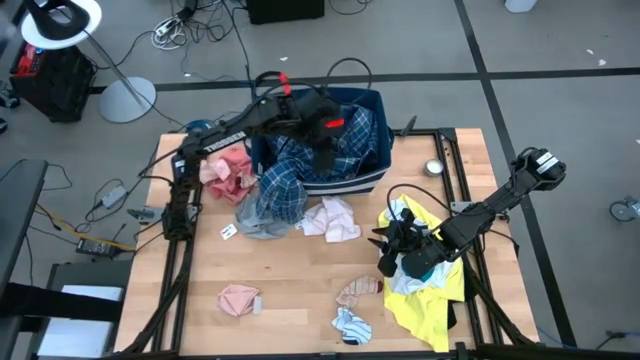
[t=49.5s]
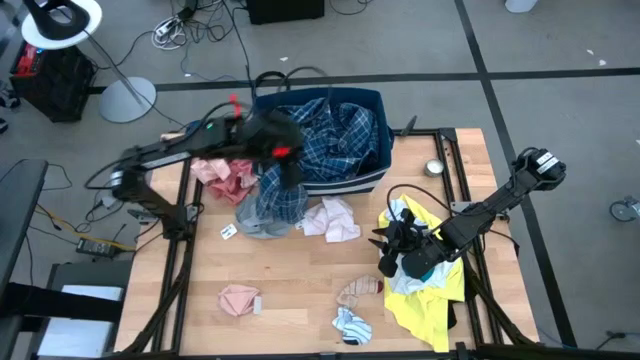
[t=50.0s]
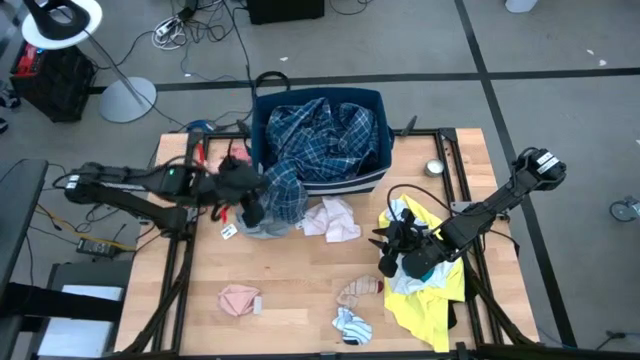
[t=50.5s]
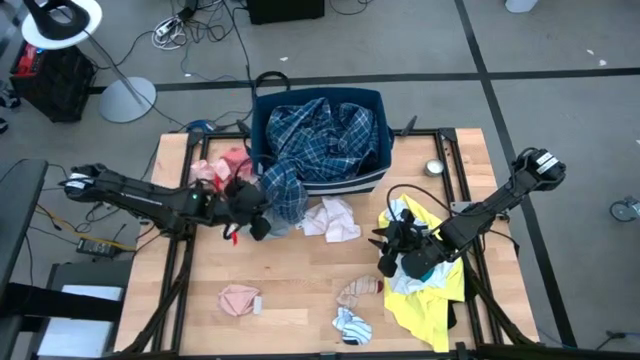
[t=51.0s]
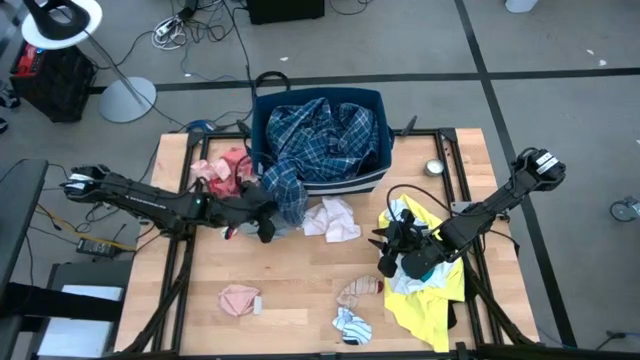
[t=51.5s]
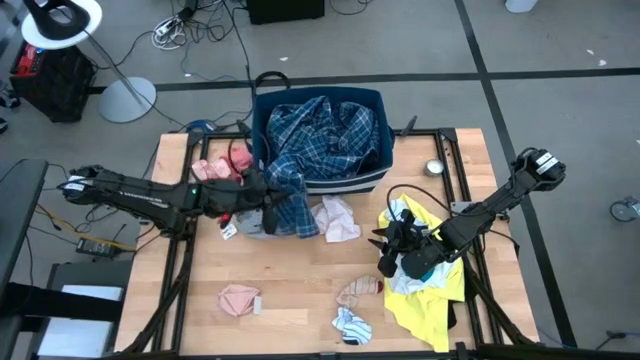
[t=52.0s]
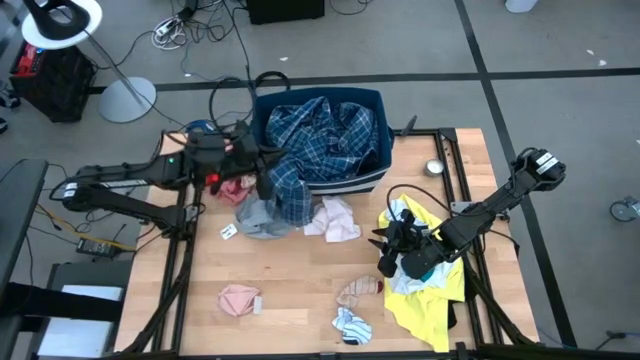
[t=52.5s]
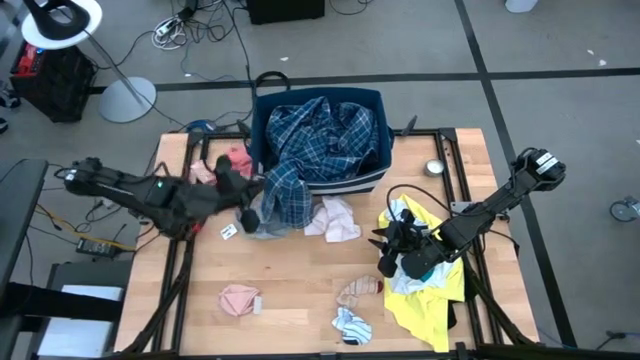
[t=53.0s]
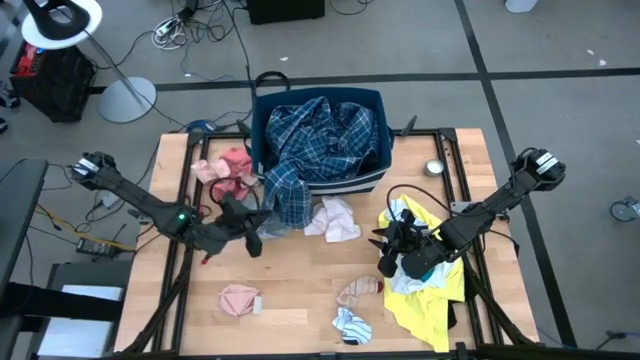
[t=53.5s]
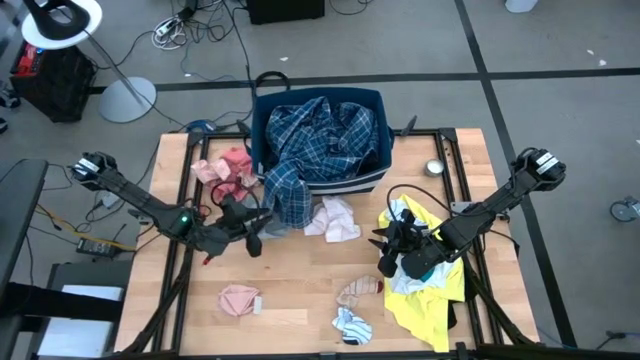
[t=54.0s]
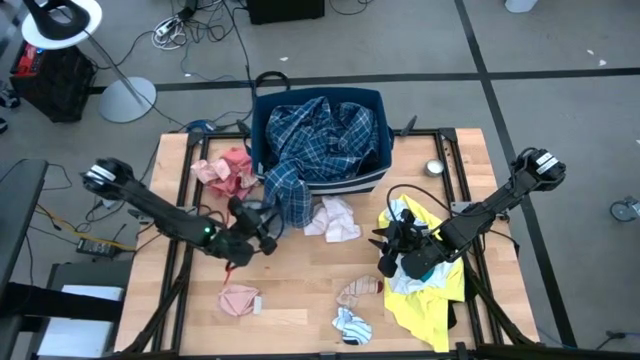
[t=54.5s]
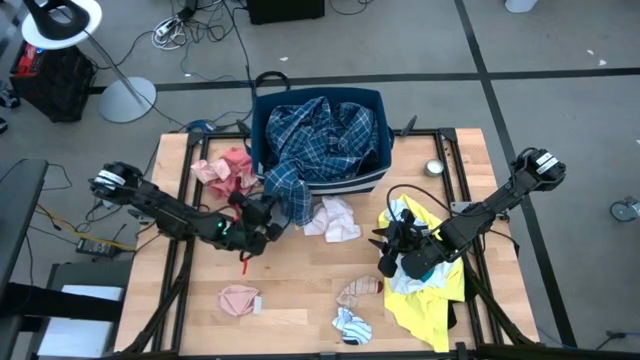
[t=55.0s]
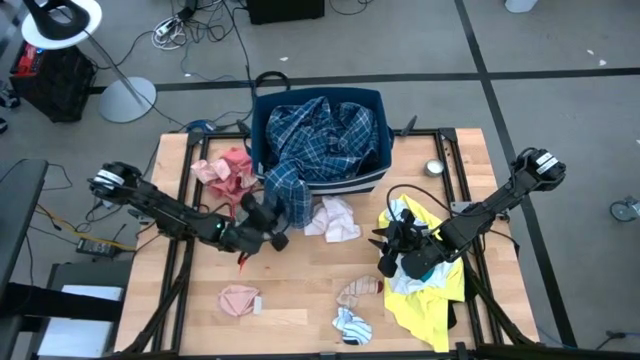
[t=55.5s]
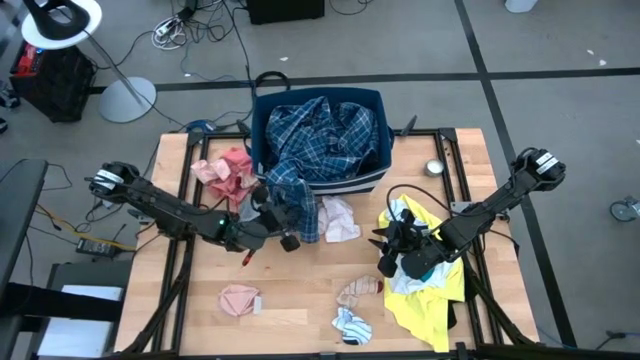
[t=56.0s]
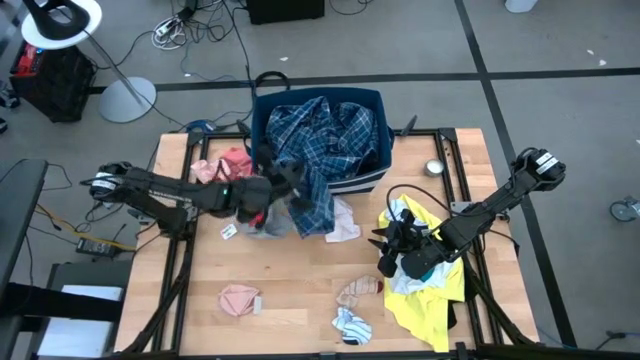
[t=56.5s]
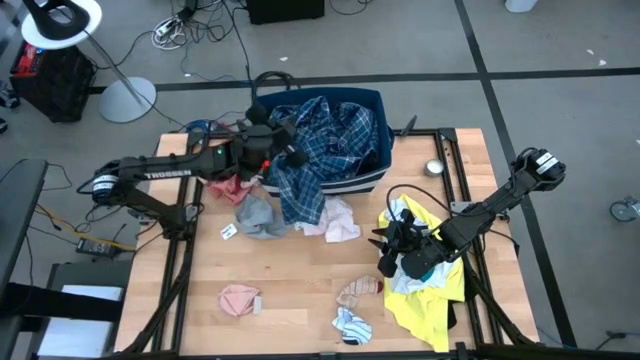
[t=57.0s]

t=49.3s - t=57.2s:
Task: Sort clothes
Put the blue checkered pants into the blue bin

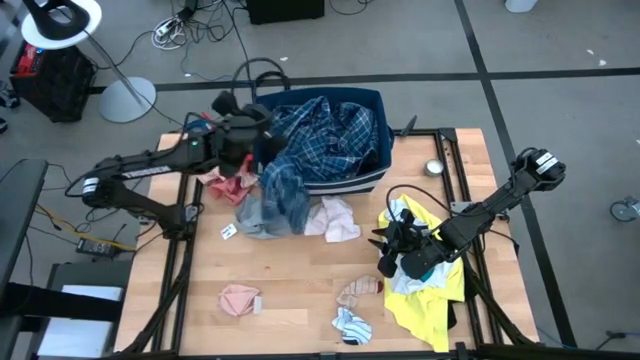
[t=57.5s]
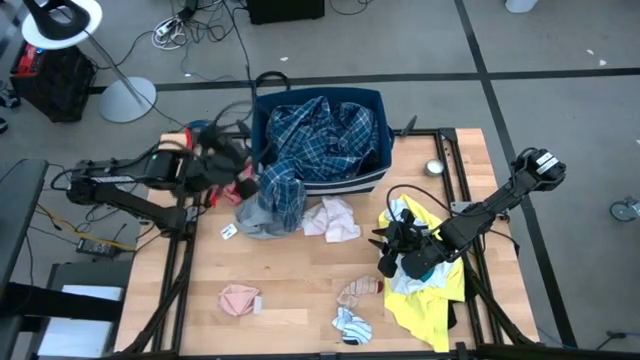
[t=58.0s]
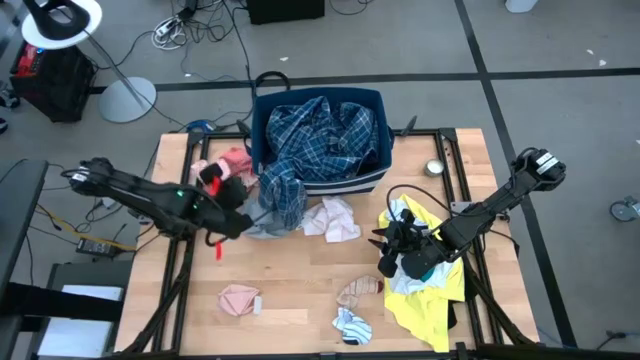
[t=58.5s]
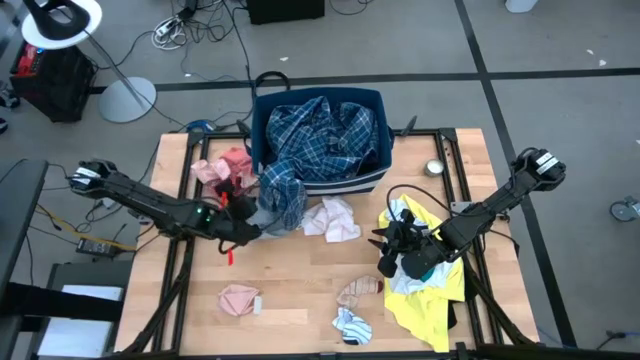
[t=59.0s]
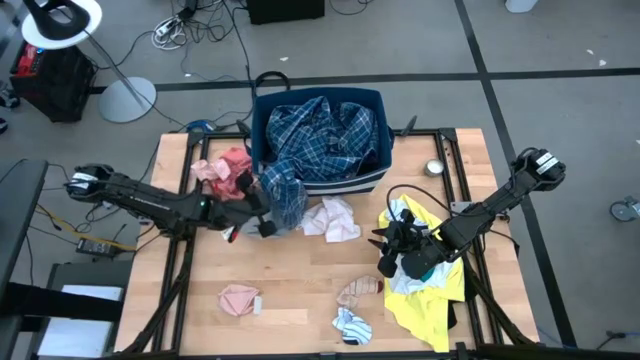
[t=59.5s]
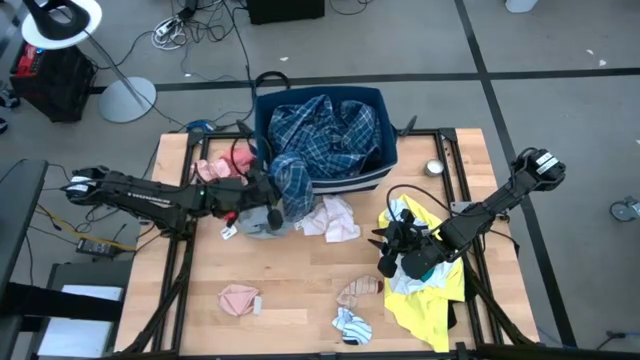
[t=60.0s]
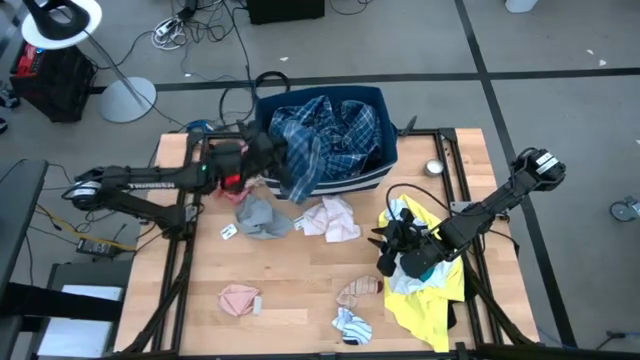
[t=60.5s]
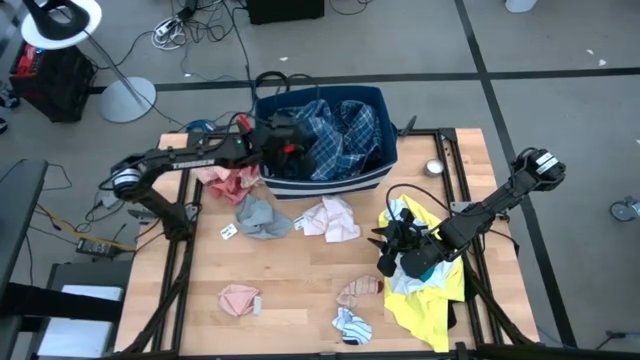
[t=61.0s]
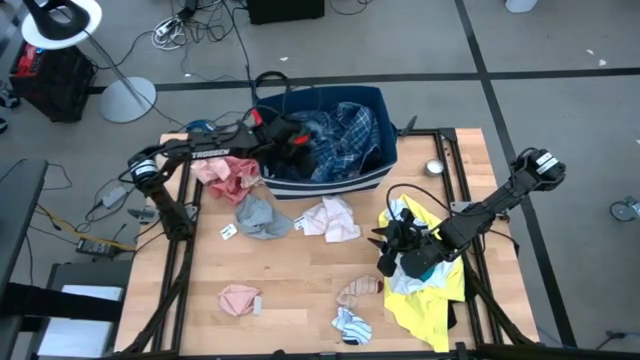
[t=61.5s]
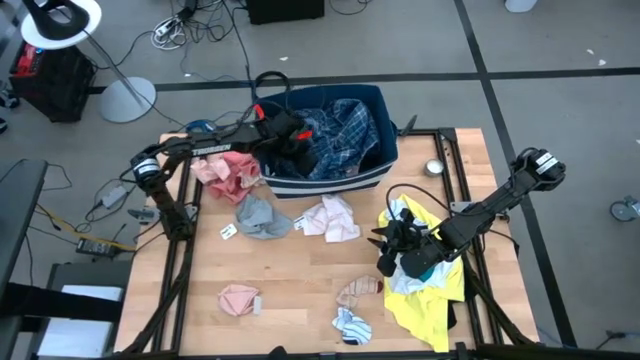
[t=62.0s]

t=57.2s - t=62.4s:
Put the blue checkered pants into the blue bin

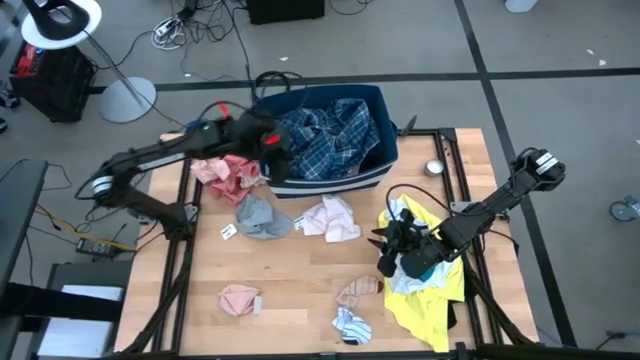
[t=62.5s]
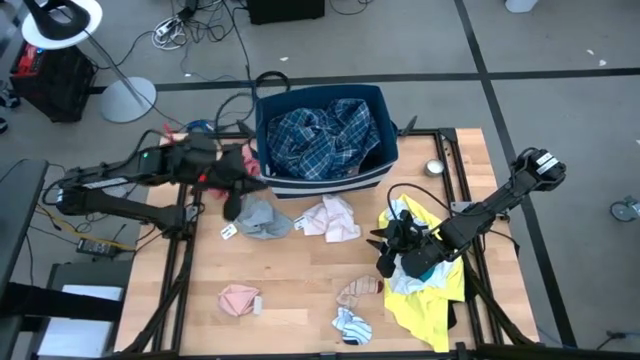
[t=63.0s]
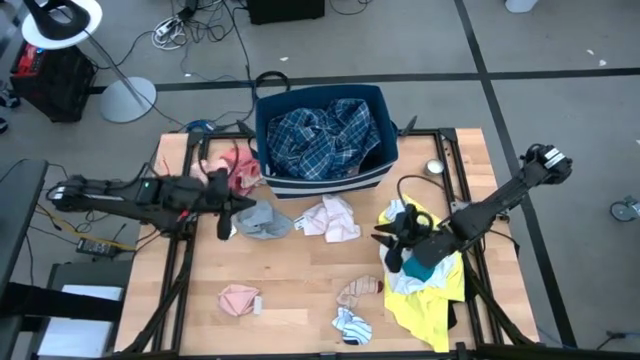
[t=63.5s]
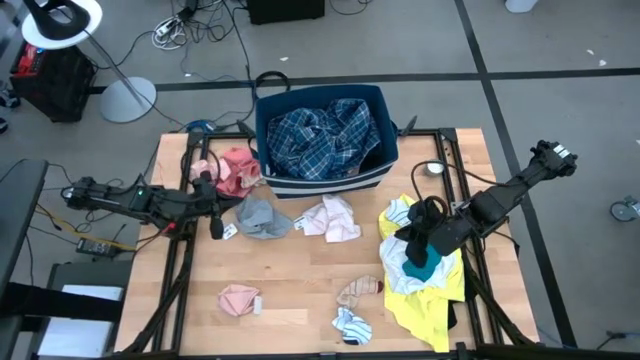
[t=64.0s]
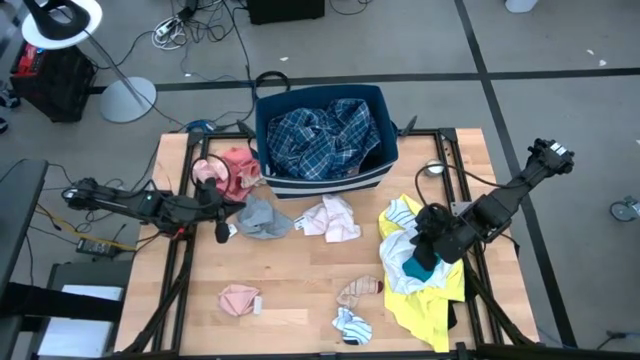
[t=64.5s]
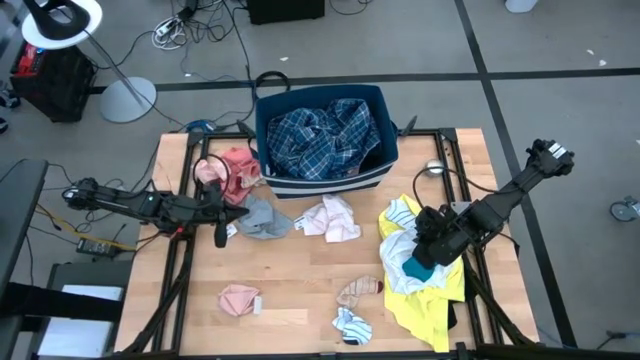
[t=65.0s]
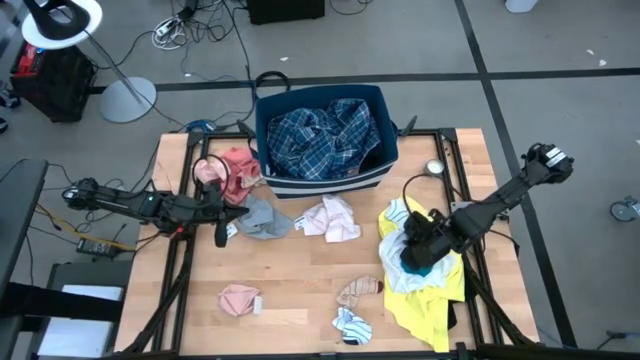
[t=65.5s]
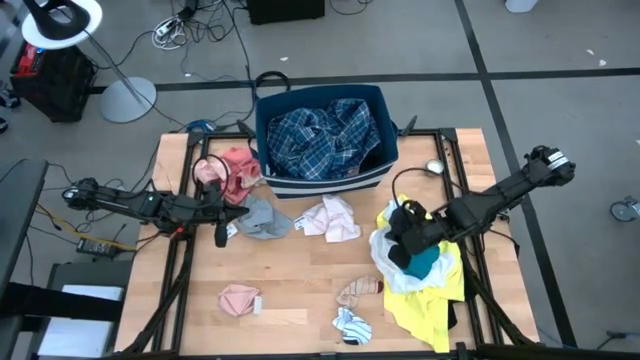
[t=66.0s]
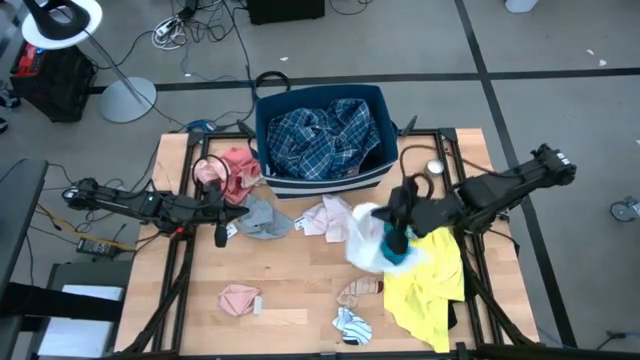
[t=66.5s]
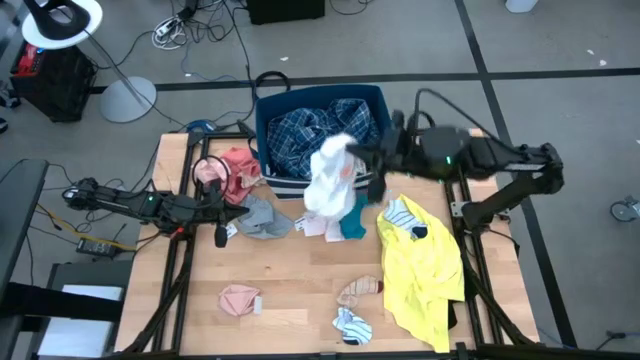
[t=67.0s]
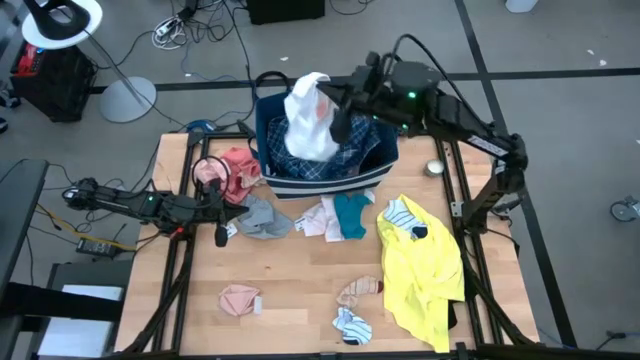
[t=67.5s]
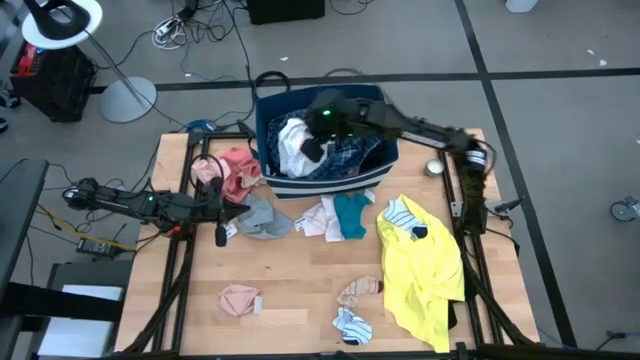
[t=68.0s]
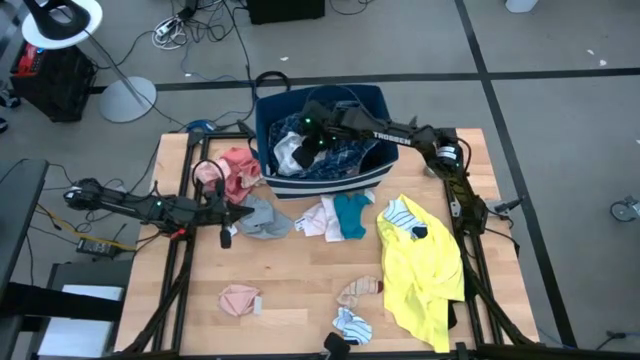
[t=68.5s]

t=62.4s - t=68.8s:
Put the white underwear into the blue bin
